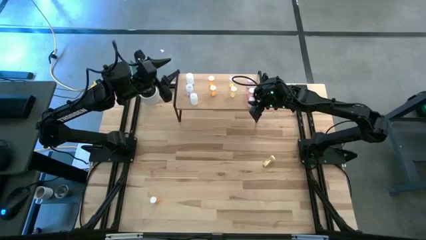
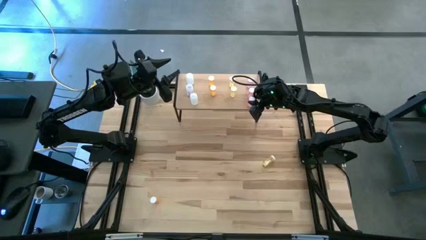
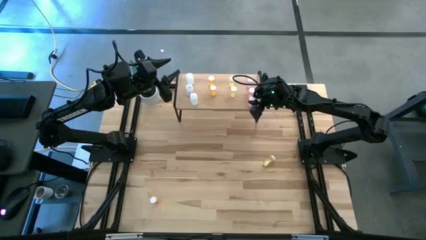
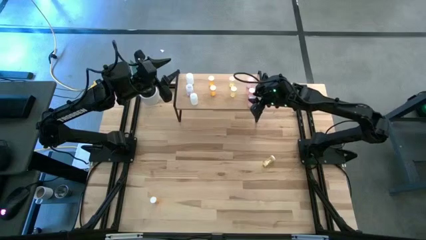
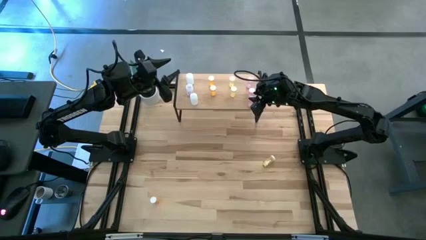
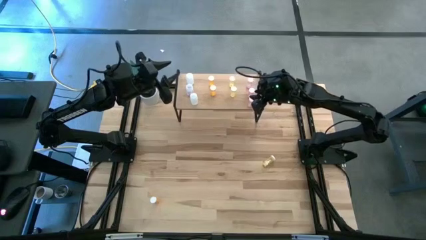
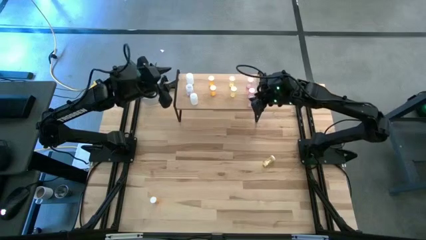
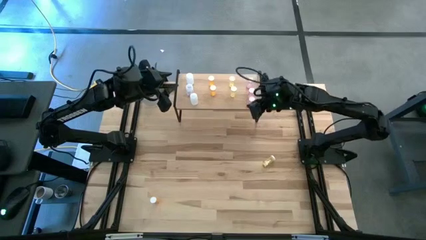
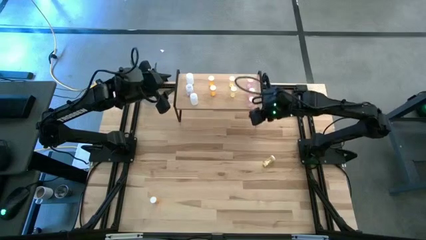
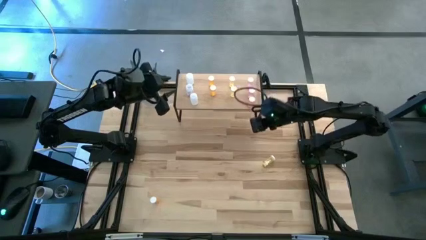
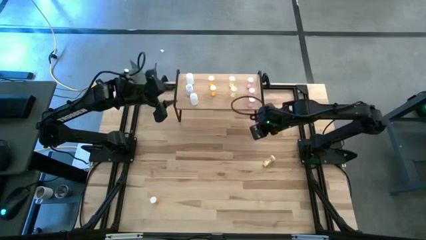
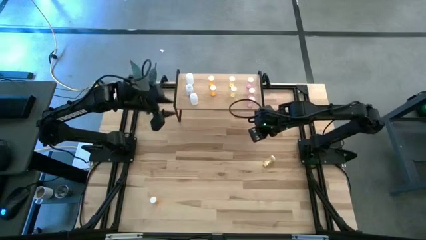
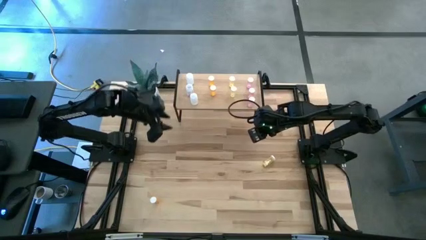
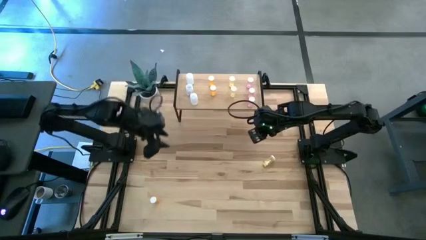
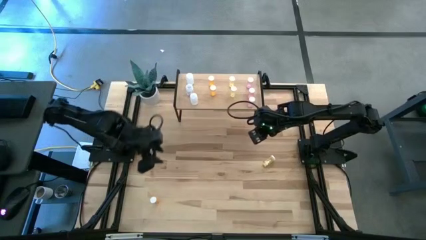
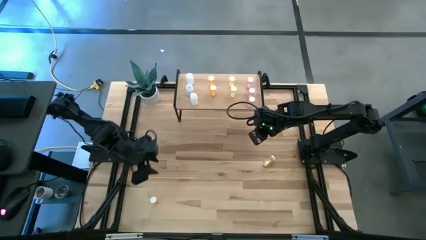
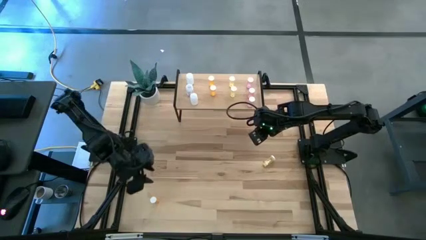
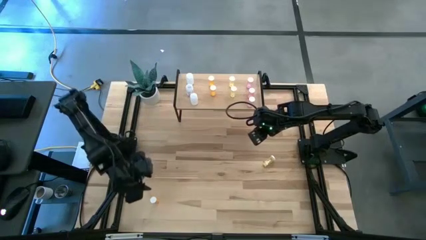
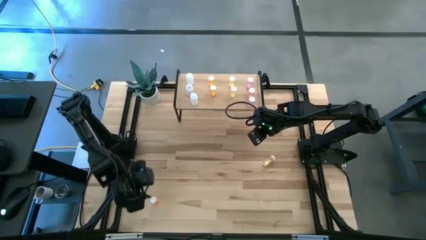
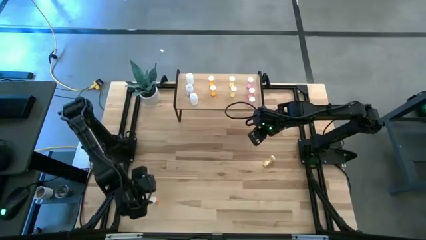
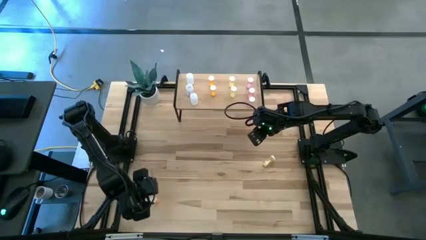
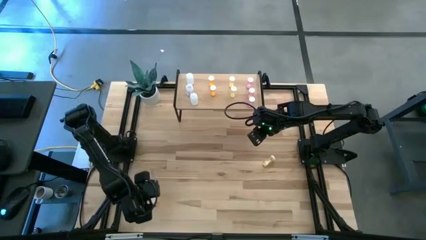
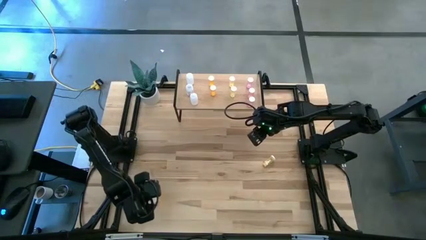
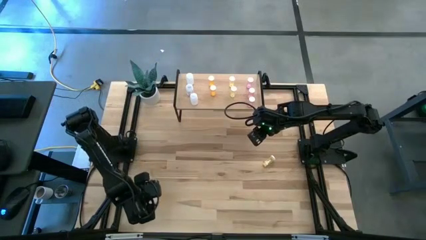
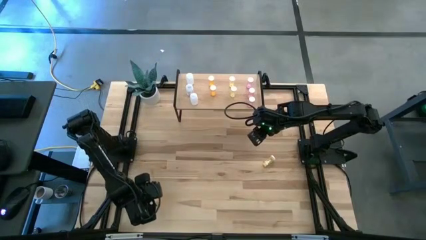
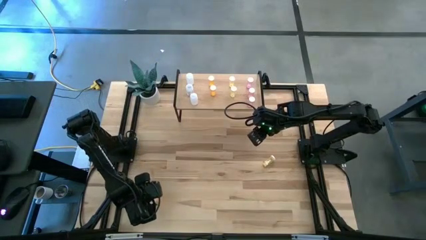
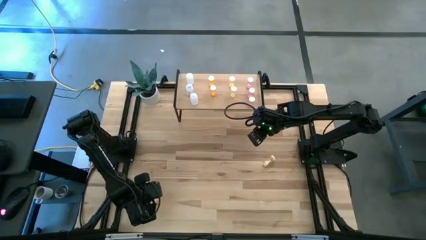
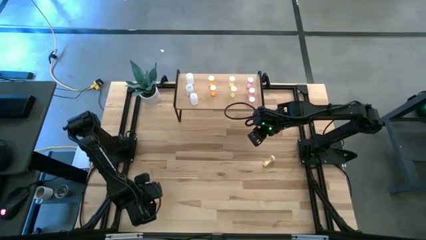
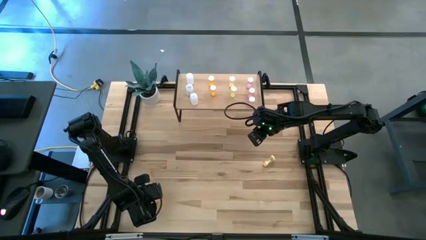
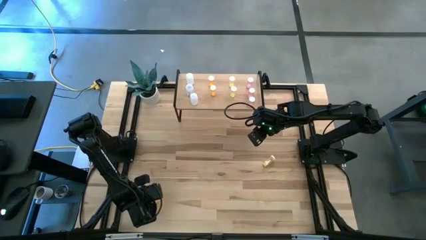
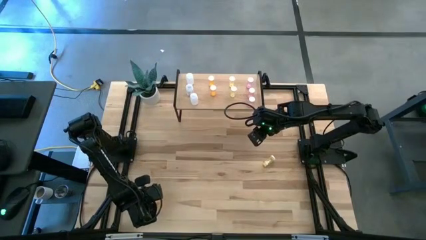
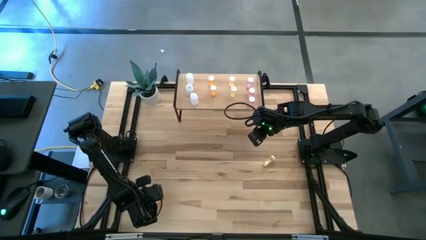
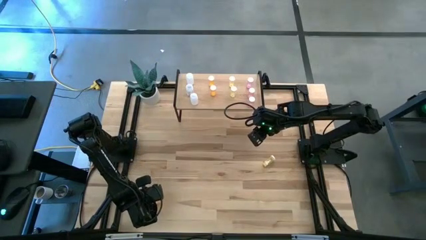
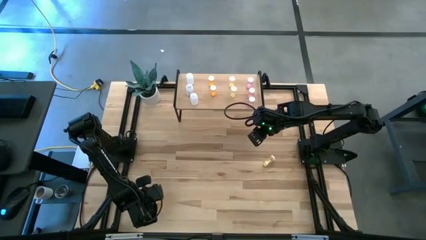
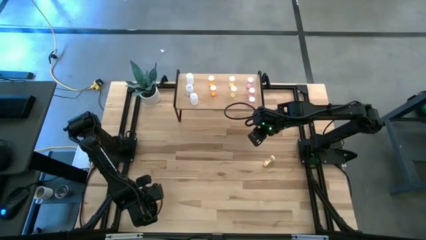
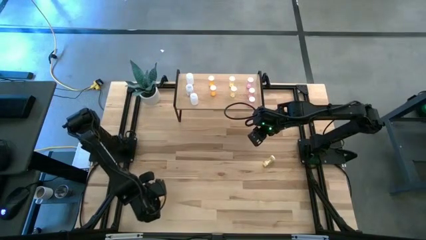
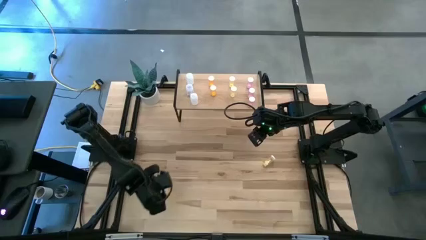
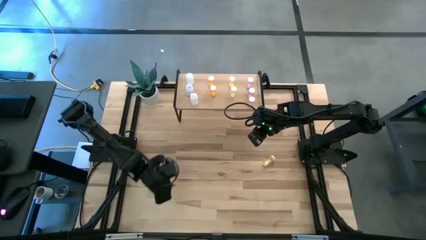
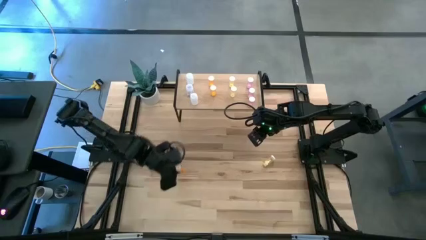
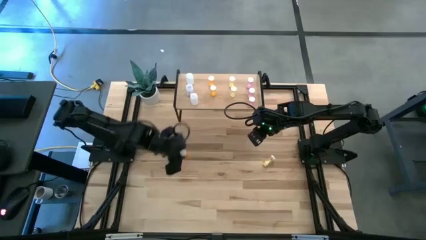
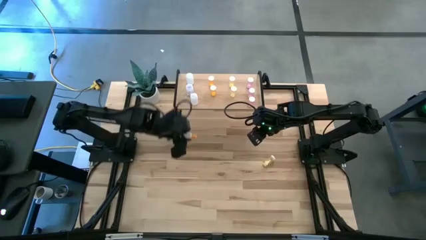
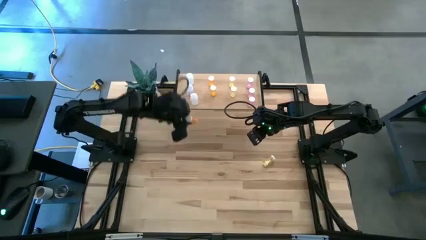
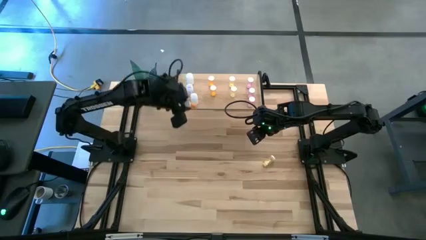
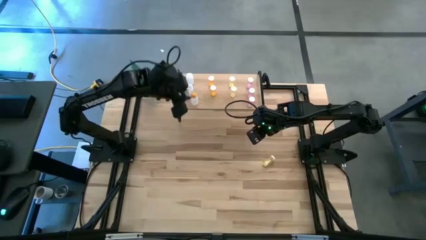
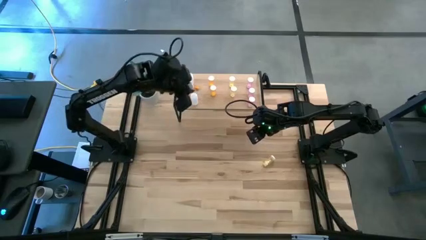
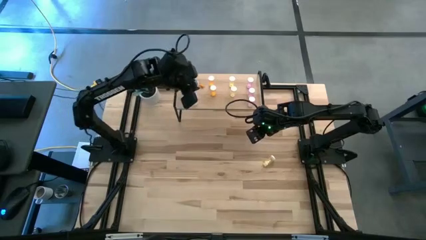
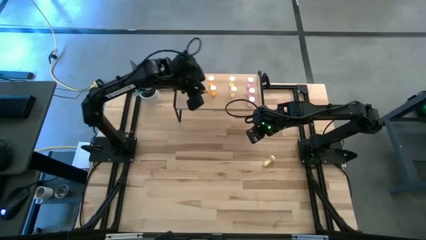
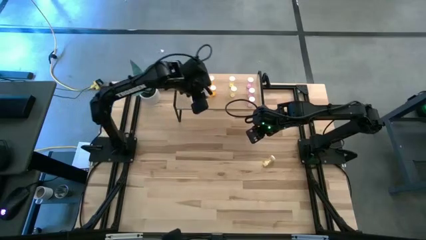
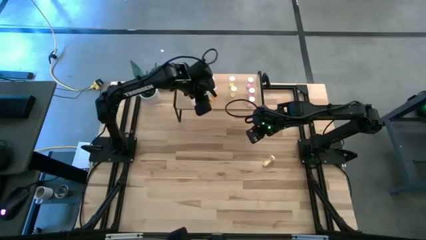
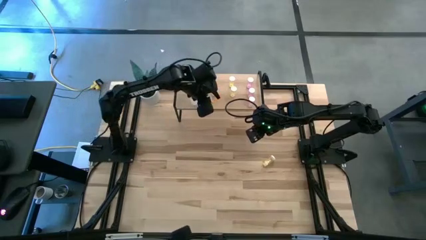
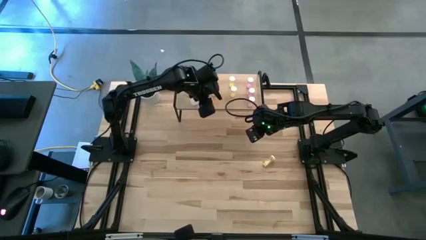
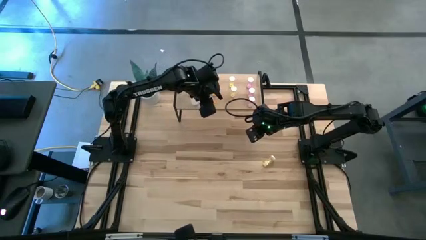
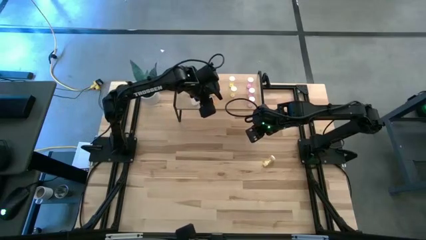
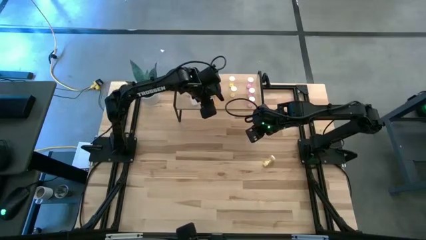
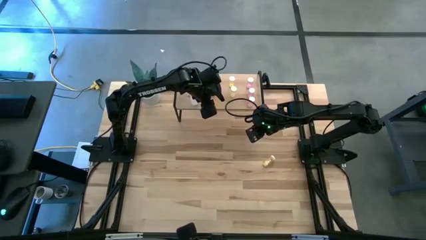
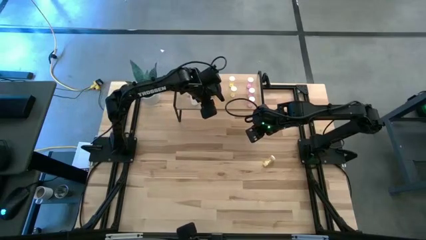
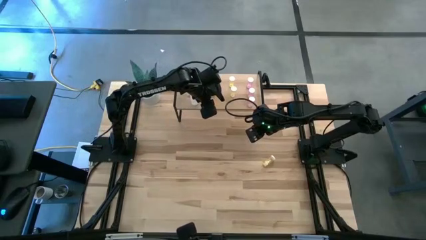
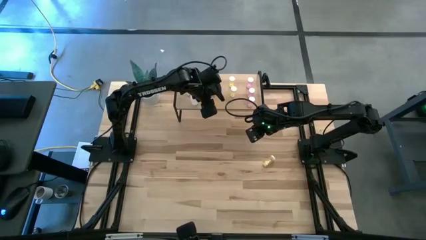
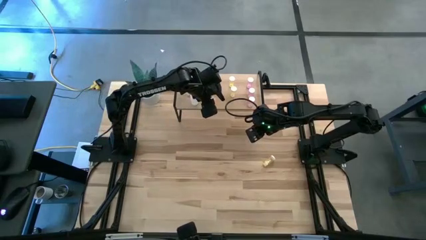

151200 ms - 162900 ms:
Task: Pick and place medicine bottles onto shelf by color
Put the orange pill bottle on the shelf aligned with the other orange pill bottle

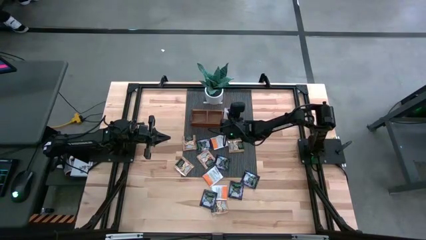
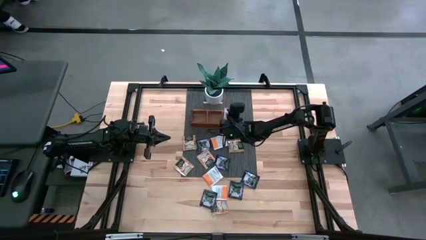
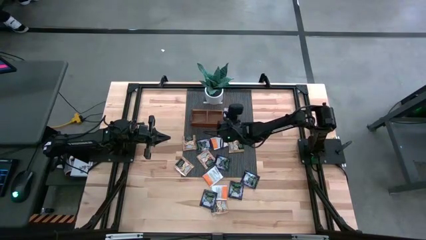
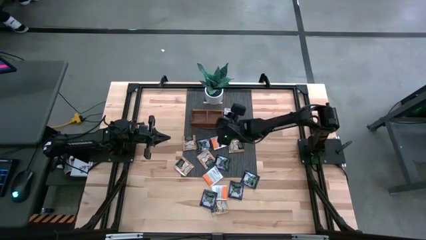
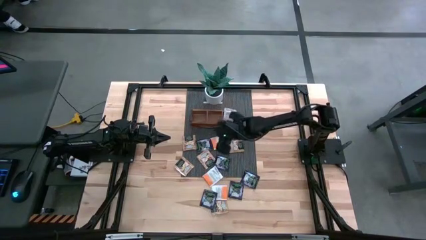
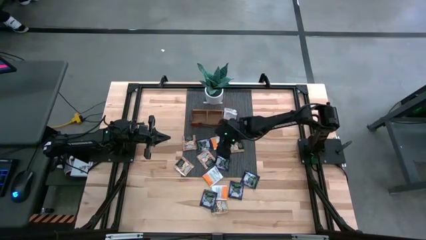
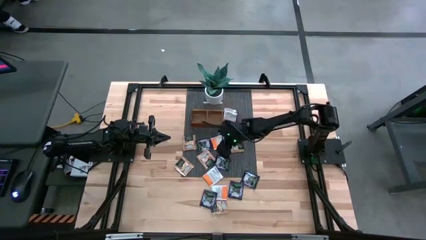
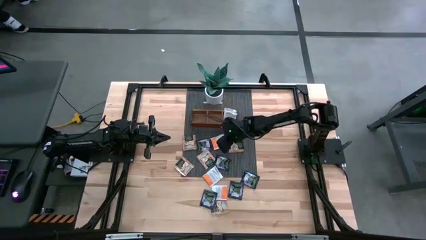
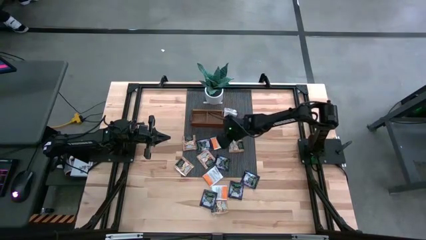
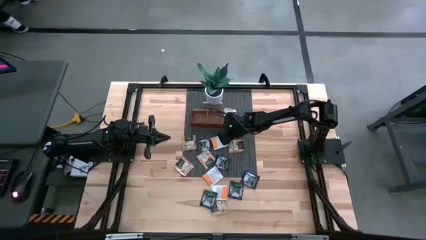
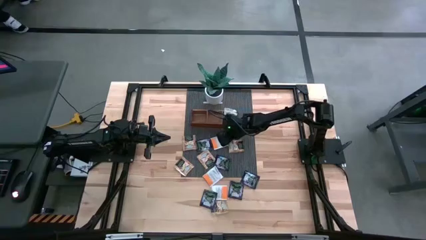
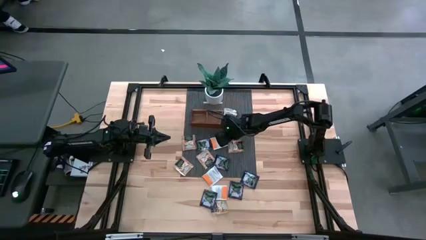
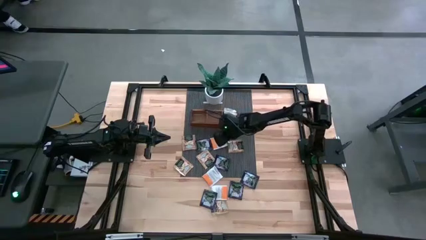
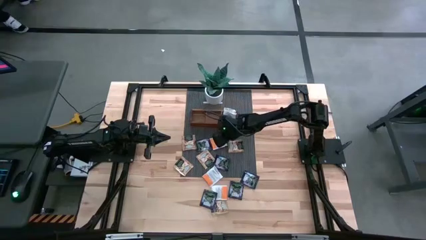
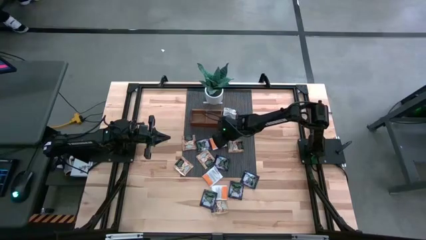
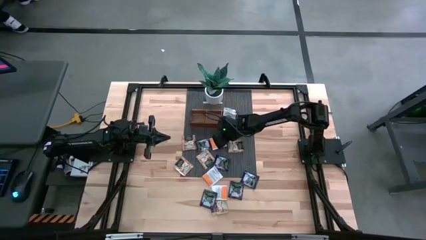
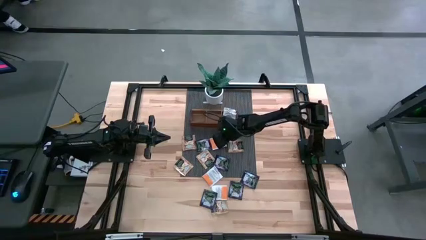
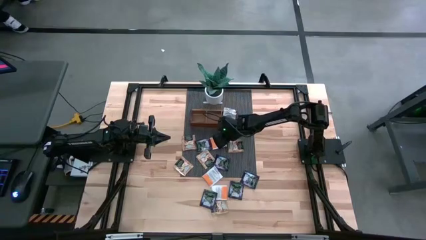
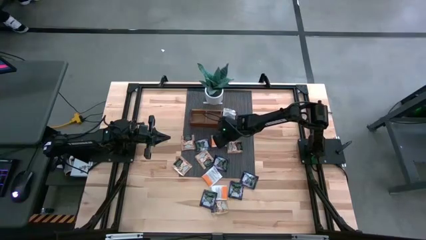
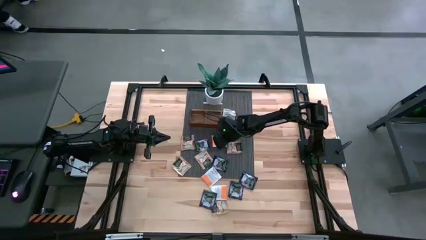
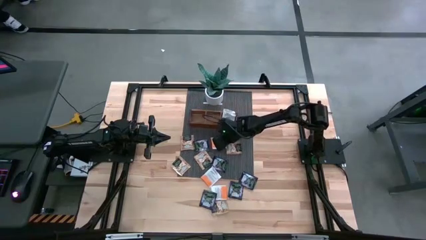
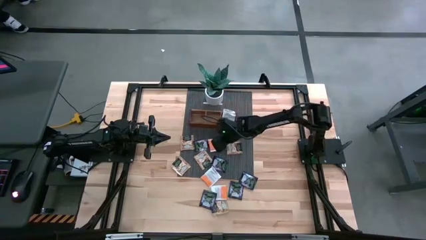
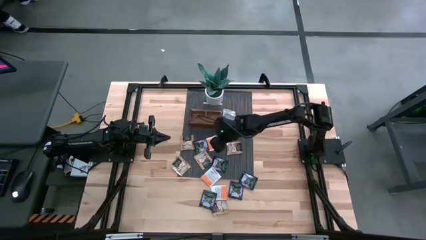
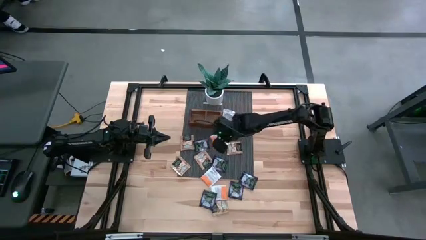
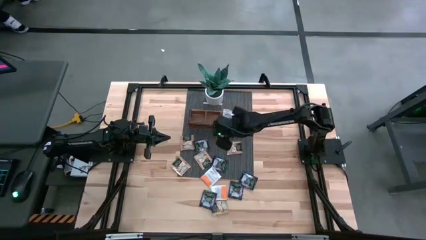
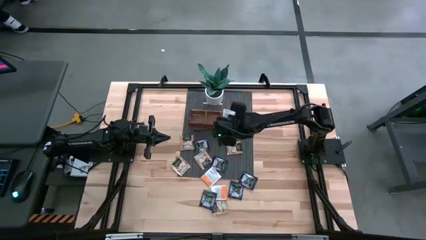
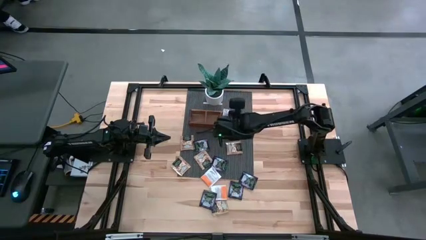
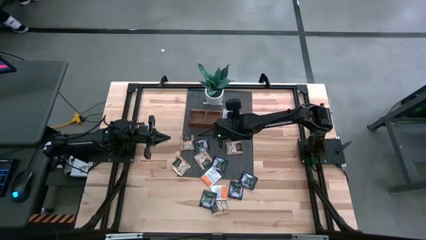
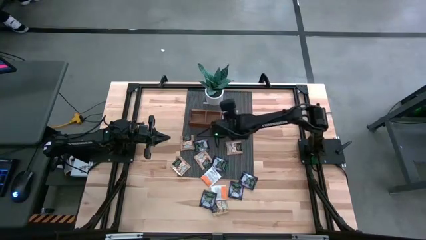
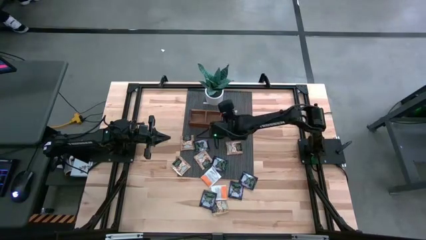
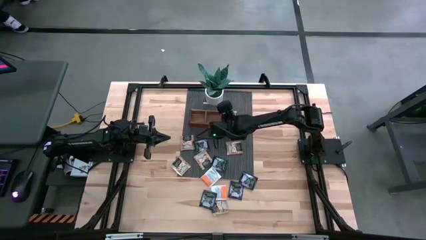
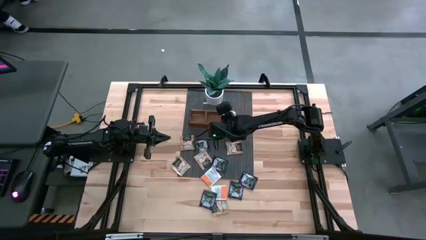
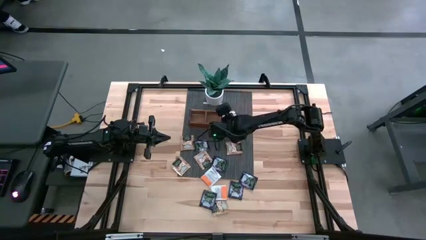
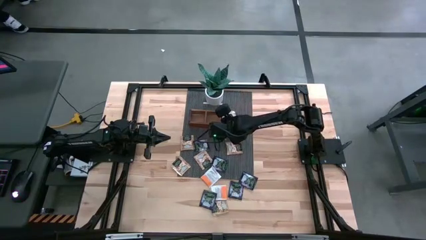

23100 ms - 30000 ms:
Task: Pick & Place Tea
Put the orange tea bag into the right section of the wooden organizer
